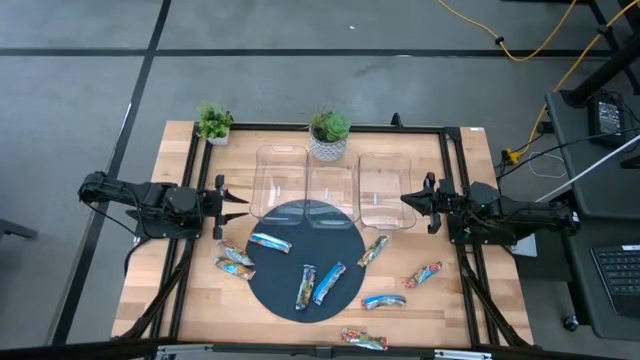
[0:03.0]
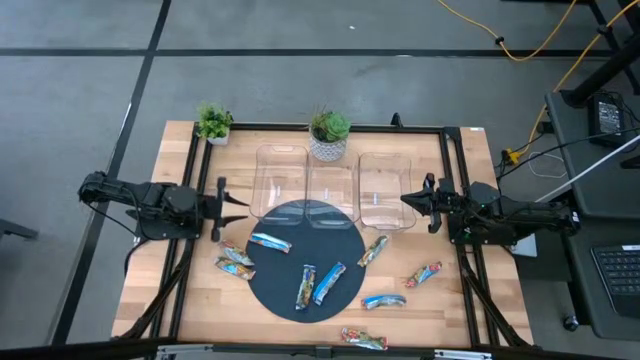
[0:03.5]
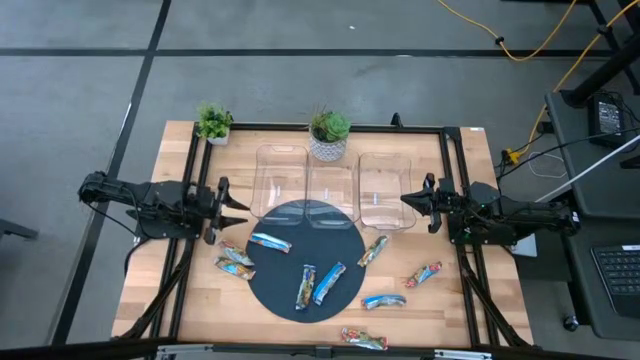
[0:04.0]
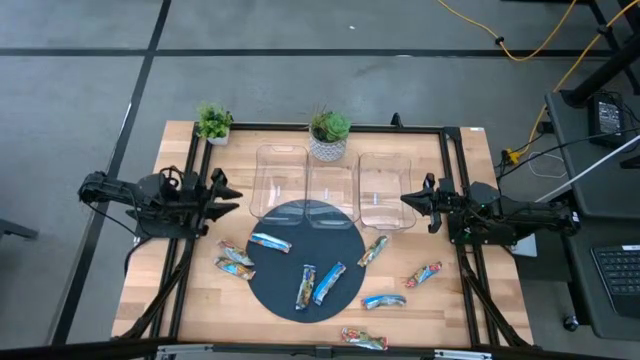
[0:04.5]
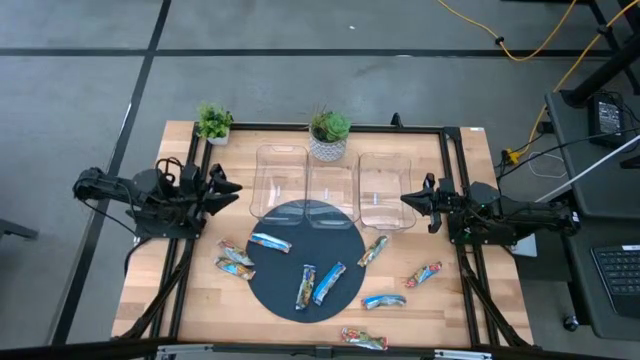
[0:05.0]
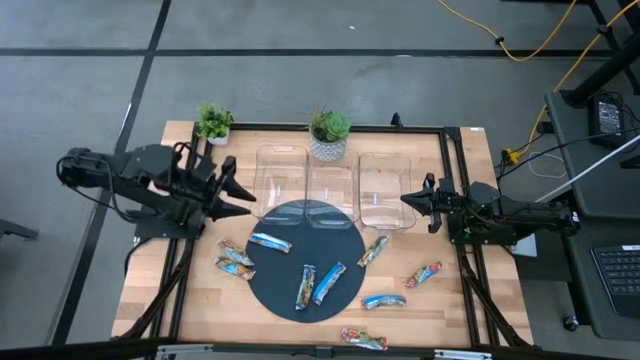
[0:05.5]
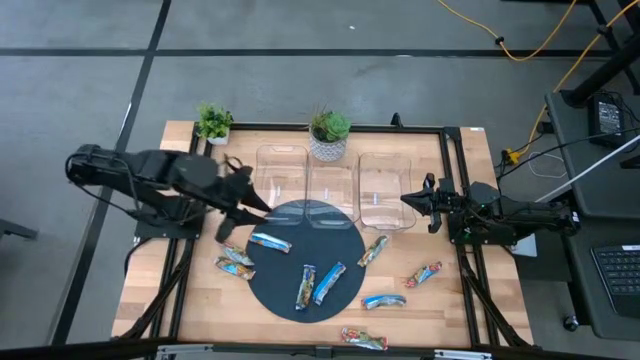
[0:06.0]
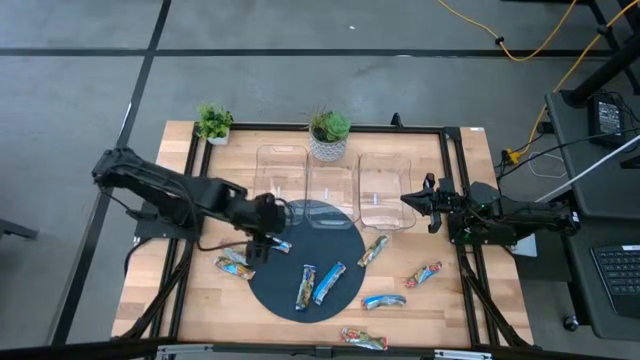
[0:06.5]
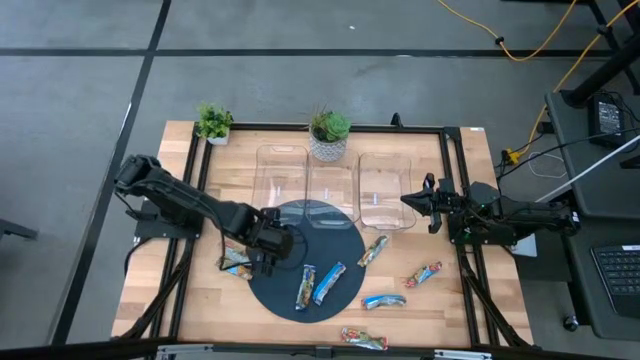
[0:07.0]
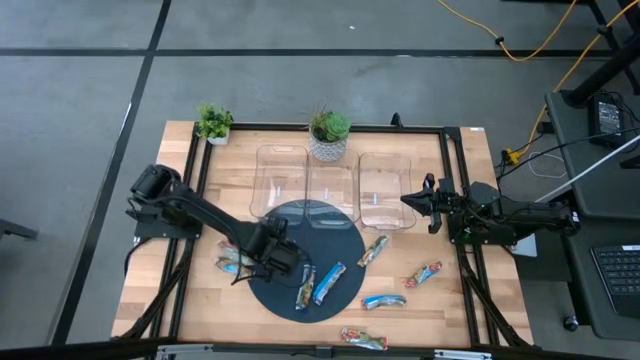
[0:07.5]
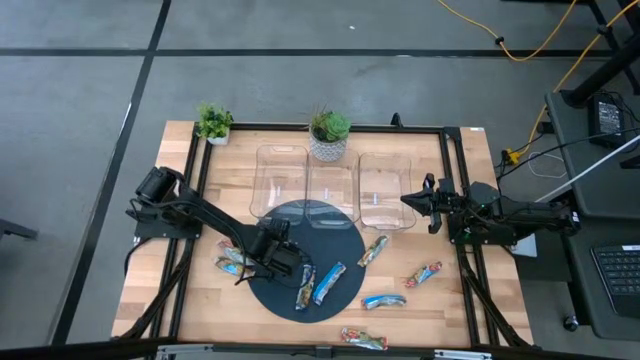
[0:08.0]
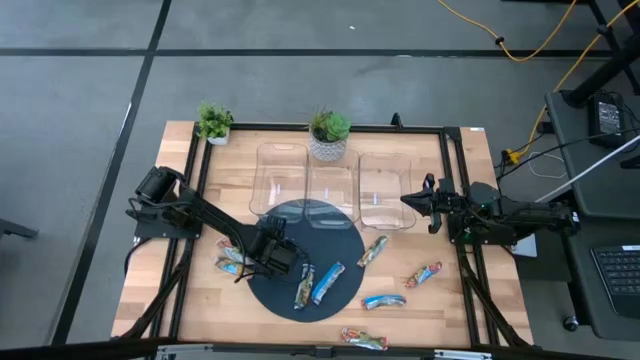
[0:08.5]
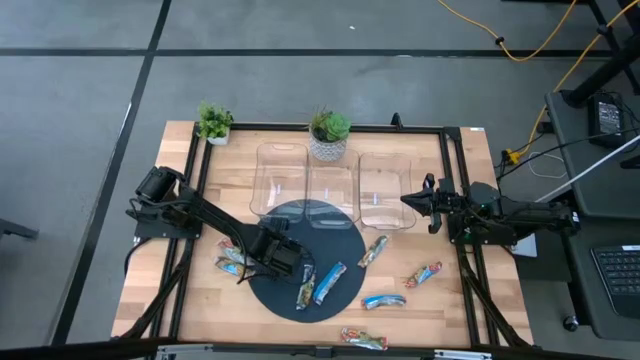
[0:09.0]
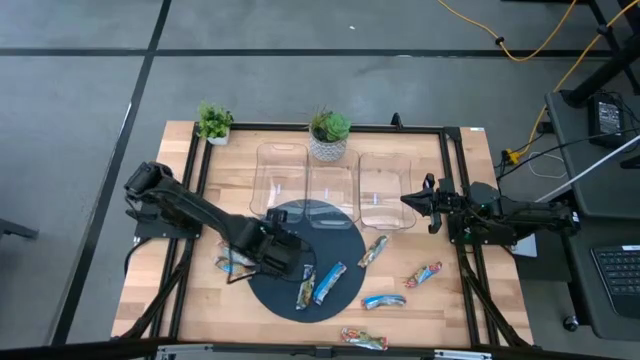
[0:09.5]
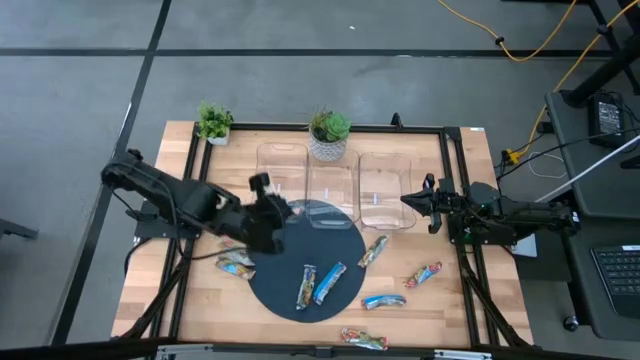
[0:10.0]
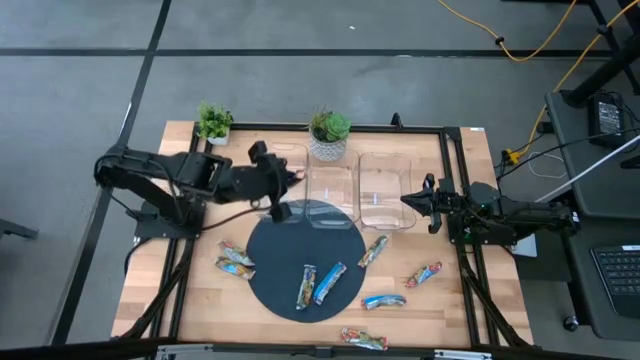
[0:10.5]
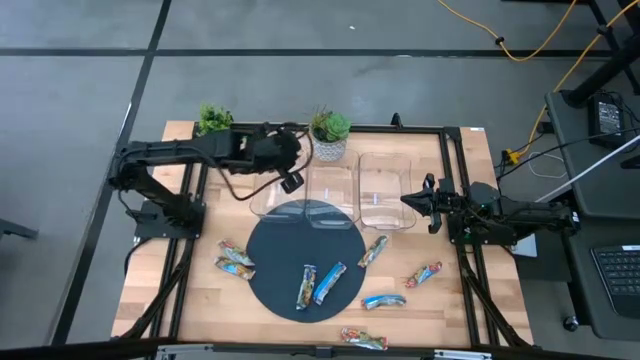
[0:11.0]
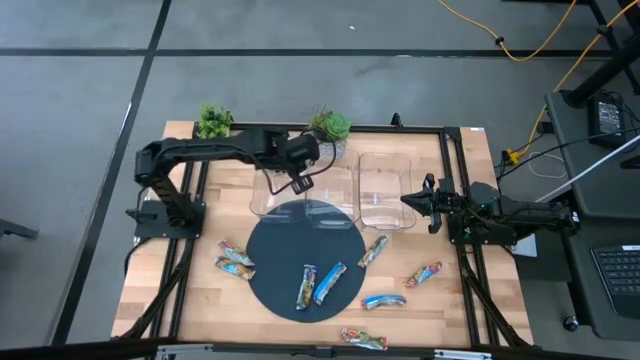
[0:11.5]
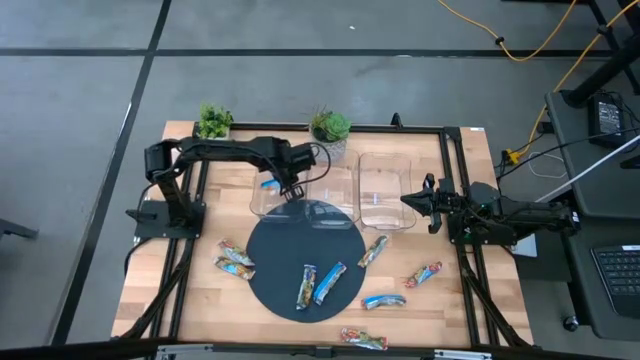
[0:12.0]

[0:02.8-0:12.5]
Task: Pick and place Granola Bars by type
Put the yellow granola bar into the left transparent bin

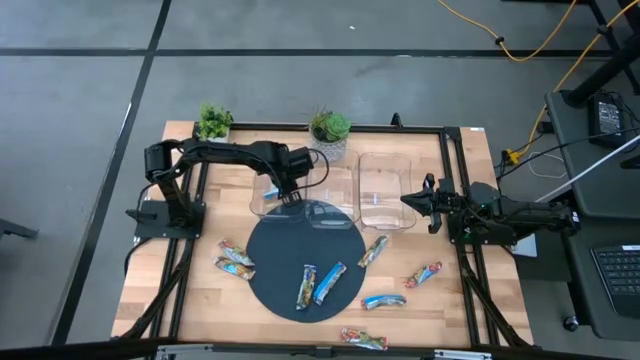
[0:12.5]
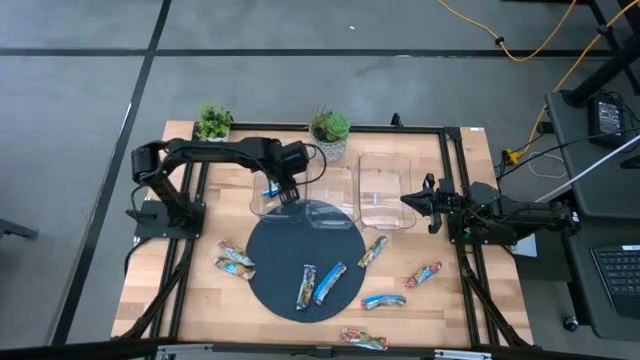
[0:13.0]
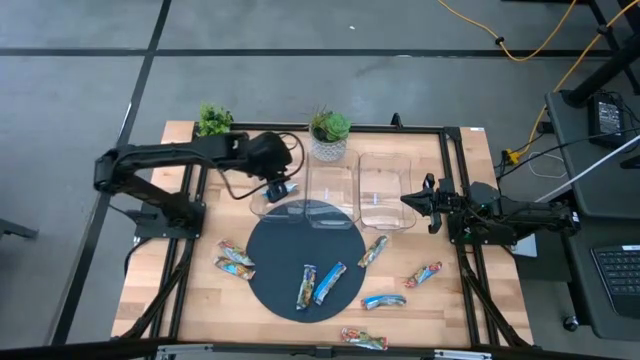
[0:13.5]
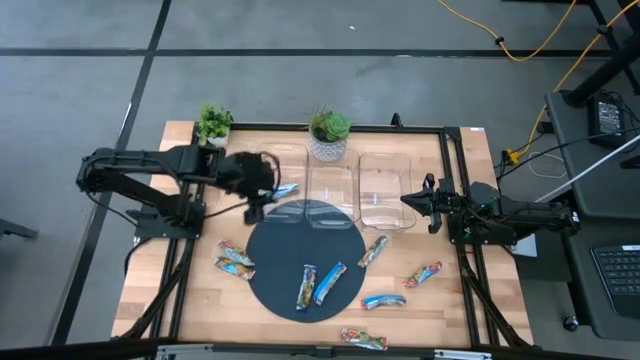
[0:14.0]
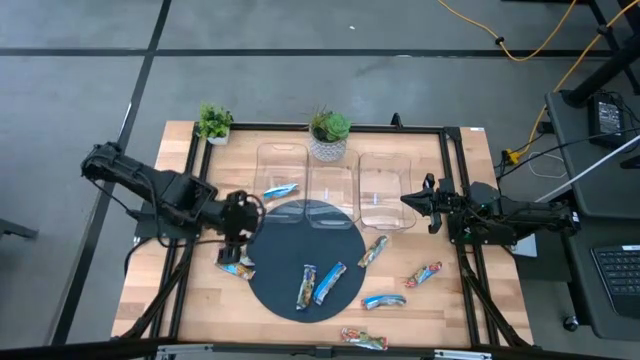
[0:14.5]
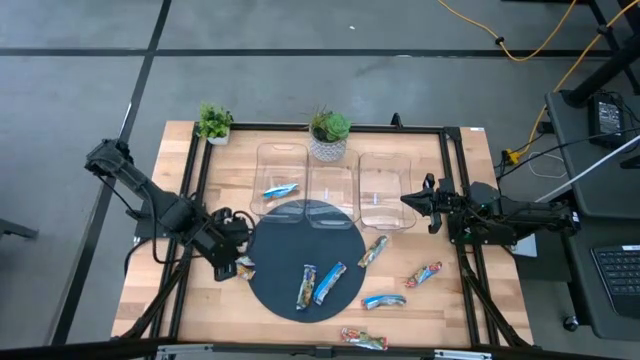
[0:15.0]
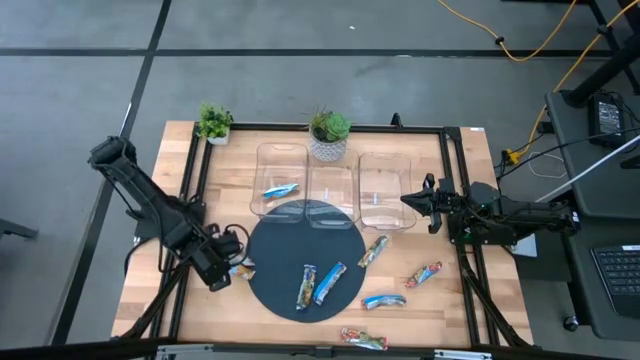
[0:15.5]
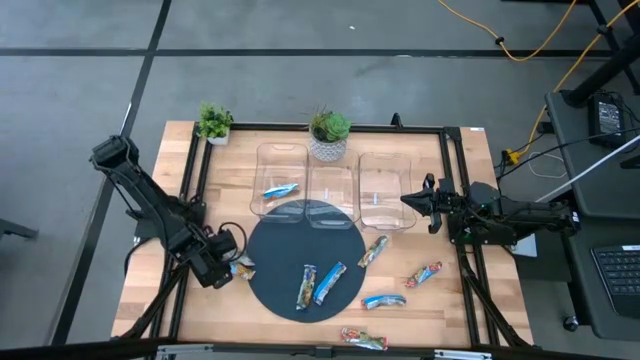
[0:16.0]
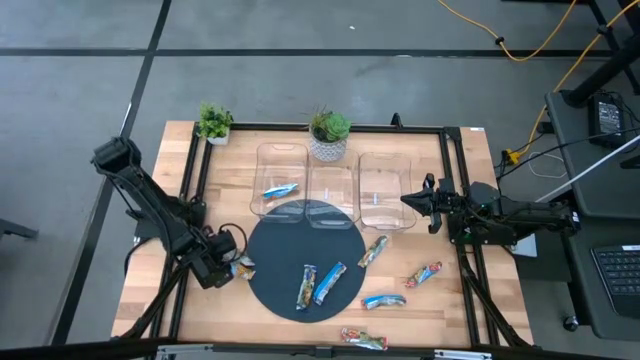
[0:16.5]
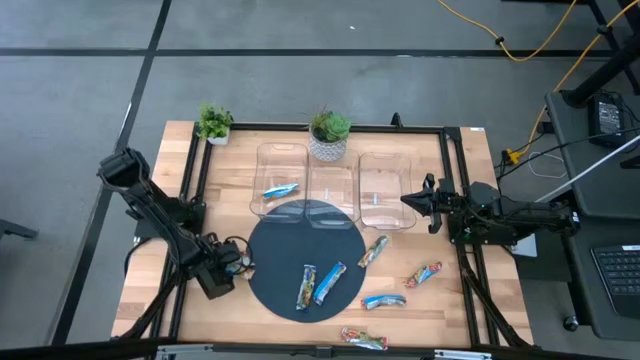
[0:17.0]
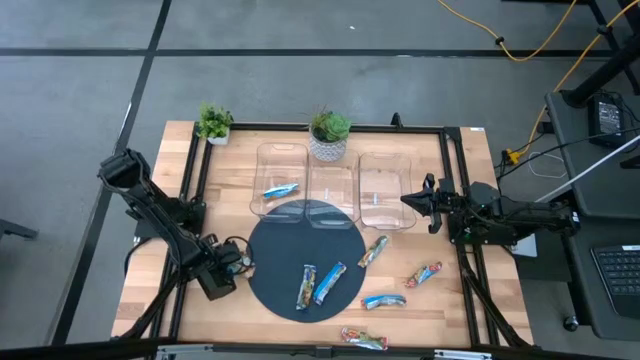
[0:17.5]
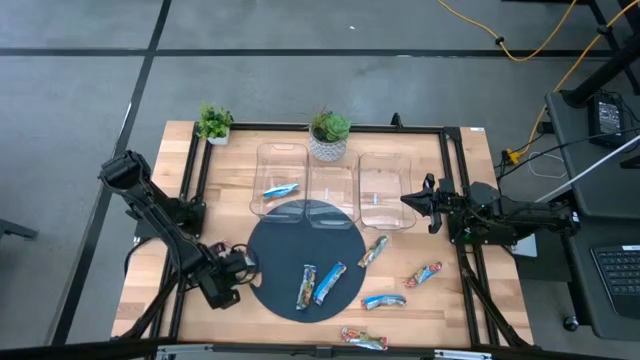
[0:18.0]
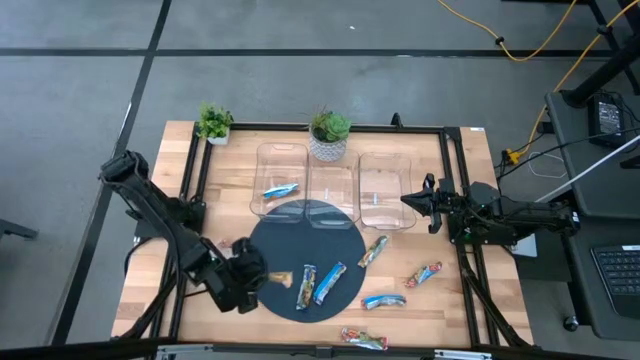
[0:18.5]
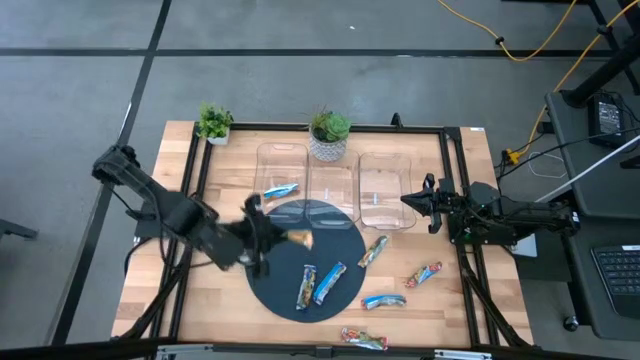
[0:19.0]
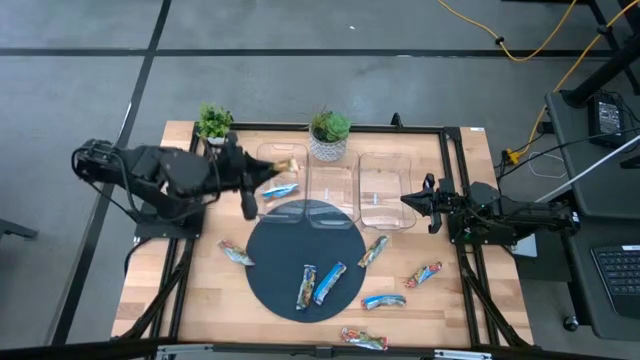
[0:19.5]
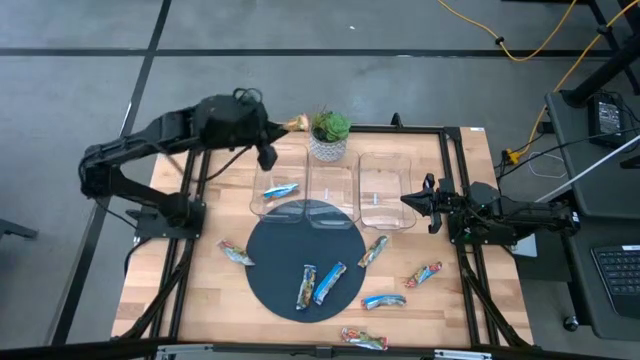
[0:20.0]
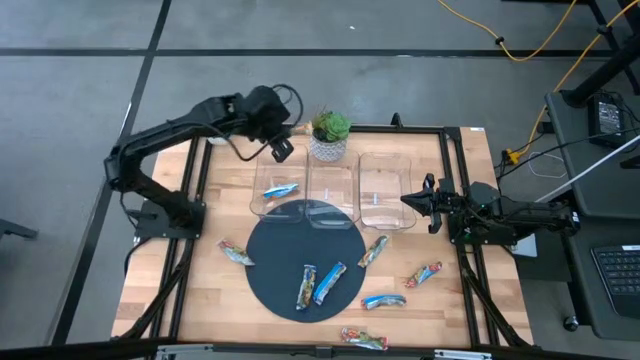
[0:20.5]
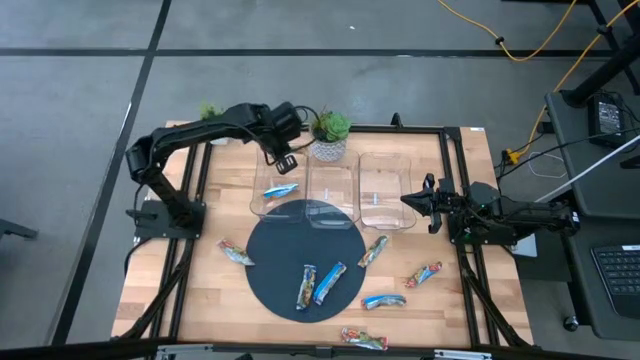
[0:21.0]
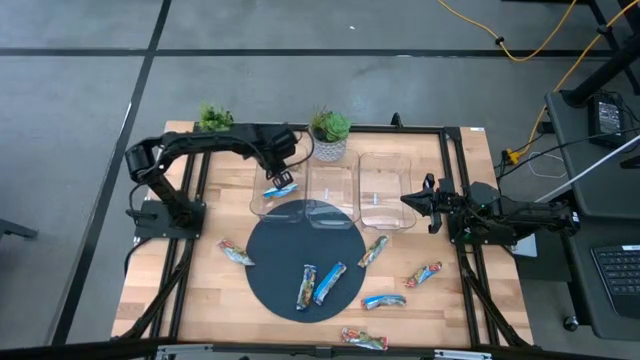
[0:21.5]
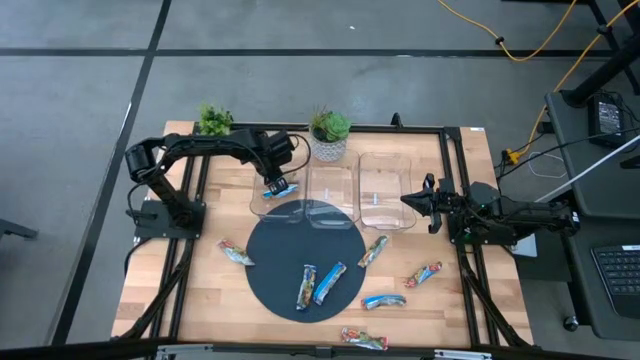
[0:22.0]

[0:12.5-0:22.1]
Put the yellow granola bar into the left transparent bin

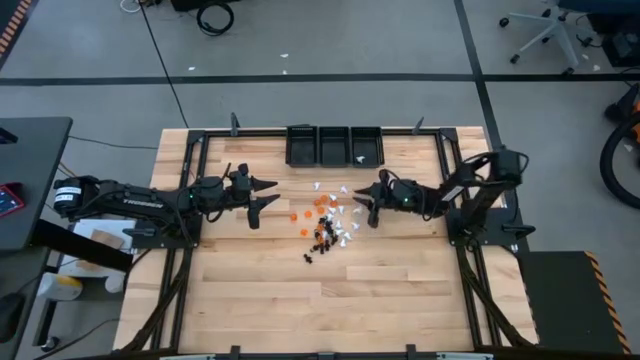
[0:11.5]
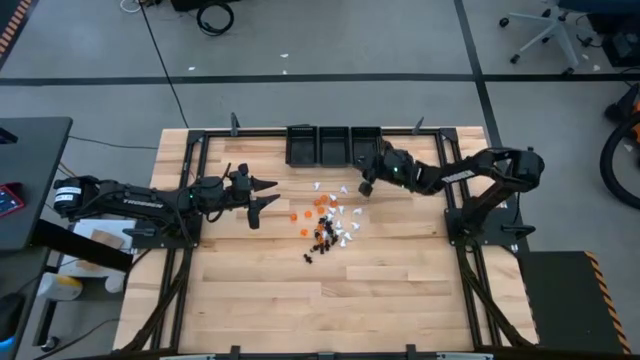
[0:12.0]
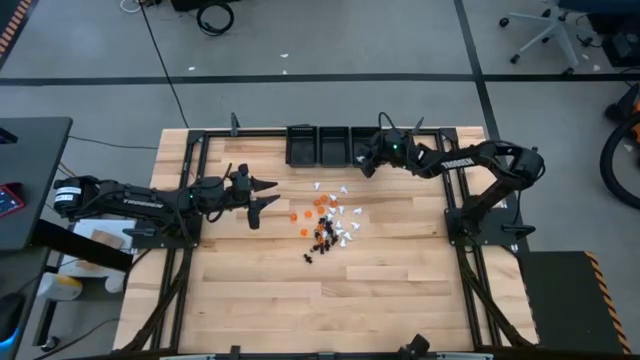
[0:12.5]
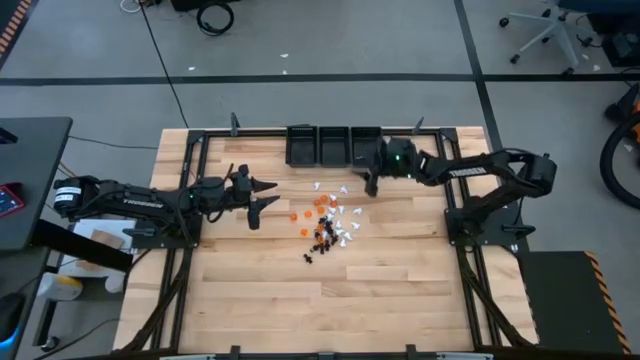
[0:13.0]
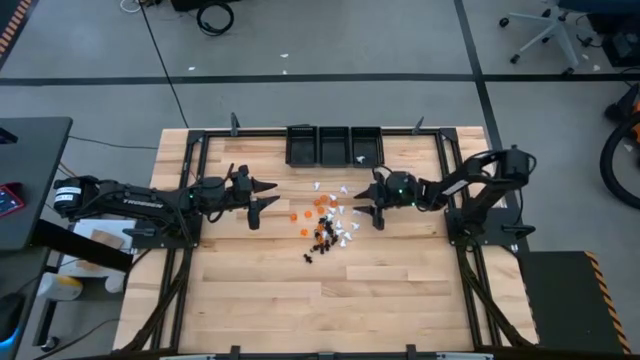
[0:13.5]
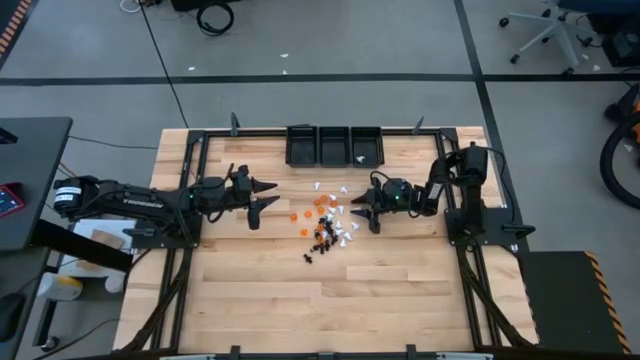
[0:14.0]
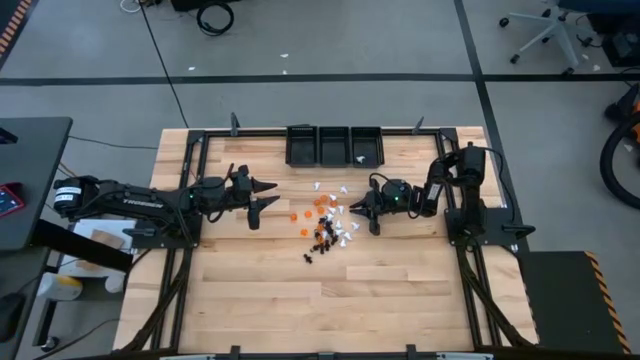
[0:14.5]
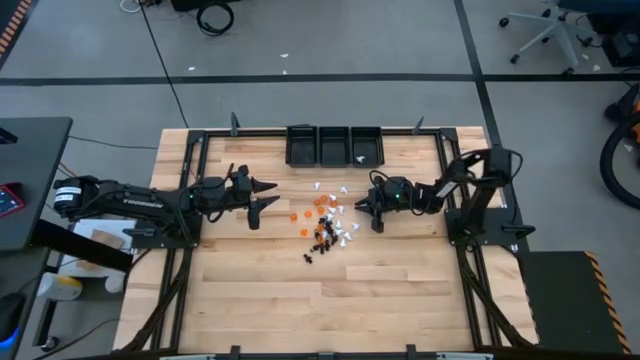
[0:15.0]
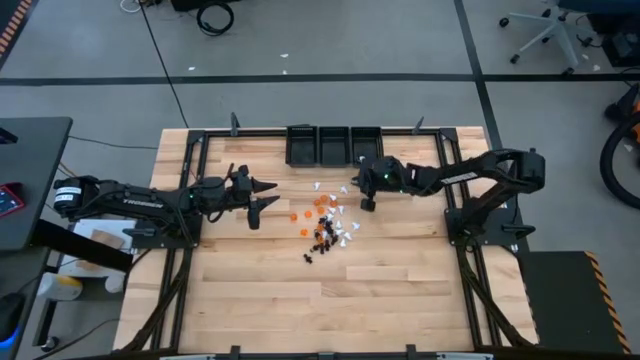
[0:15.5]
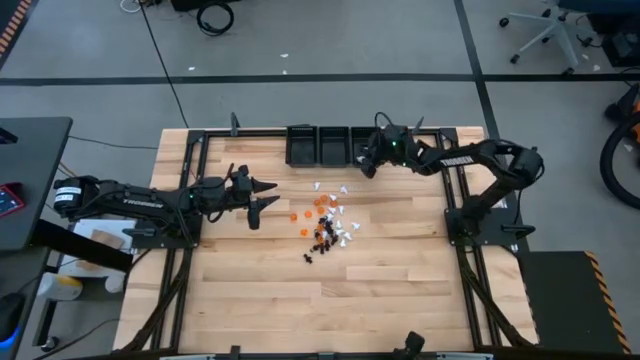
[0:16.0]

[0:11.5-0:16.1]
Task: Sort game pieces by color
Put the white game piece into the right black basket
